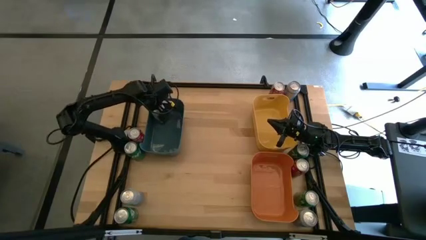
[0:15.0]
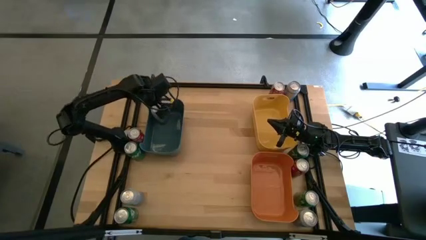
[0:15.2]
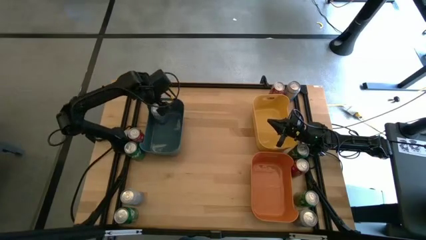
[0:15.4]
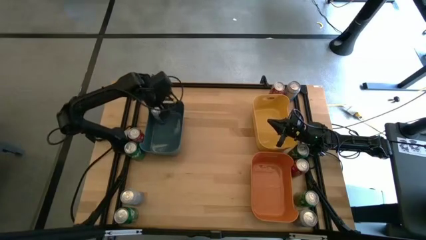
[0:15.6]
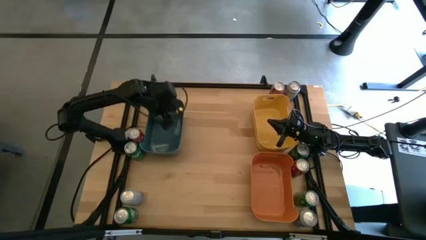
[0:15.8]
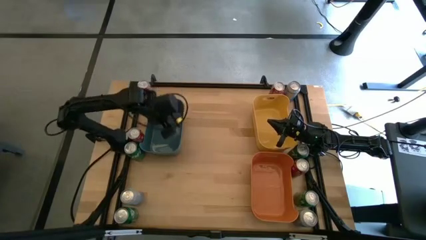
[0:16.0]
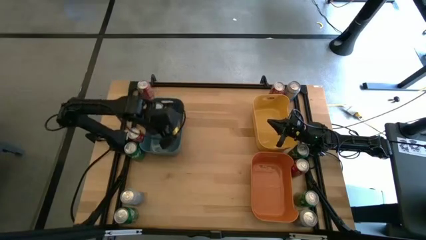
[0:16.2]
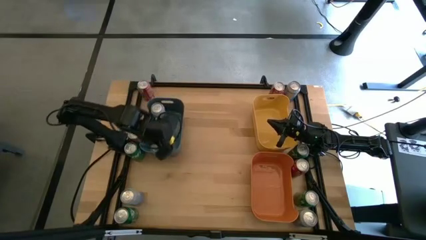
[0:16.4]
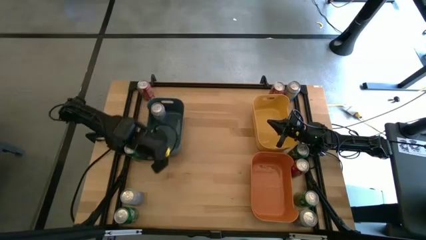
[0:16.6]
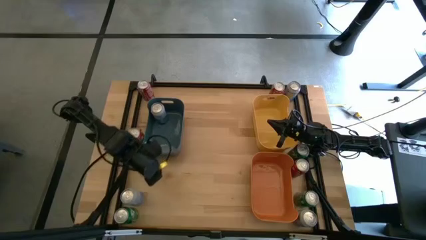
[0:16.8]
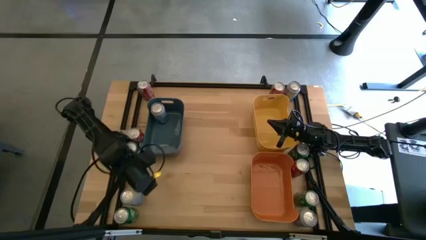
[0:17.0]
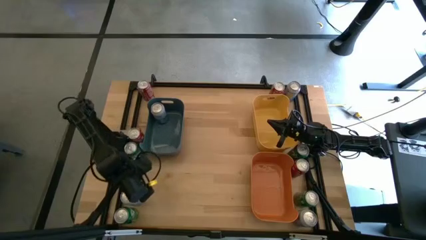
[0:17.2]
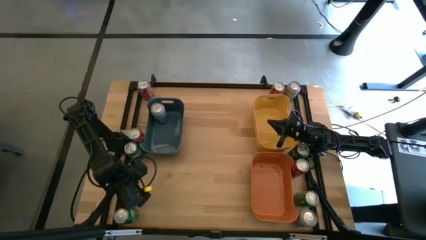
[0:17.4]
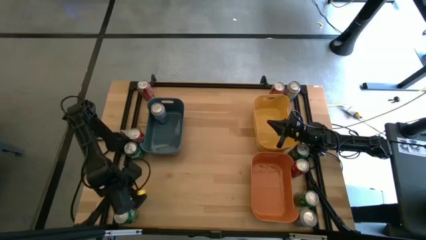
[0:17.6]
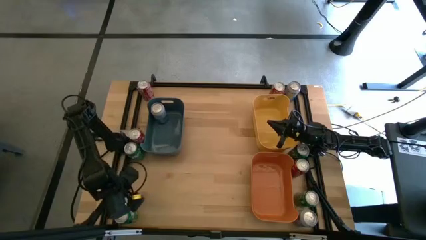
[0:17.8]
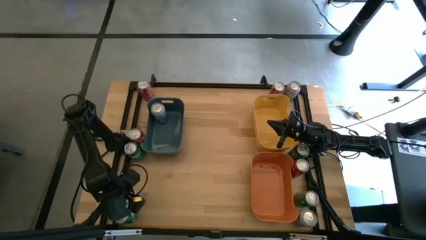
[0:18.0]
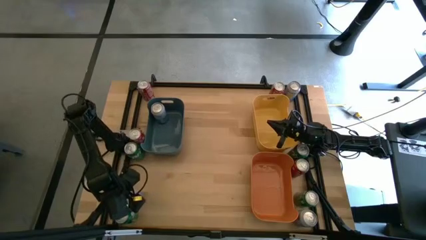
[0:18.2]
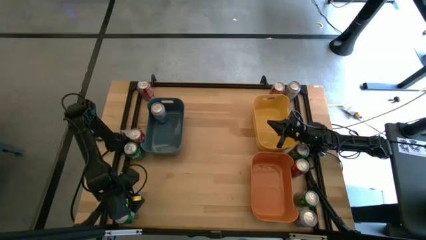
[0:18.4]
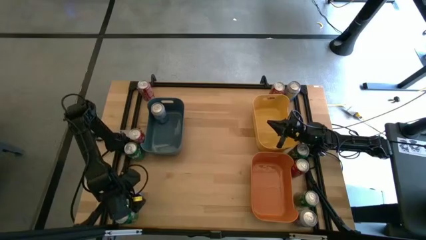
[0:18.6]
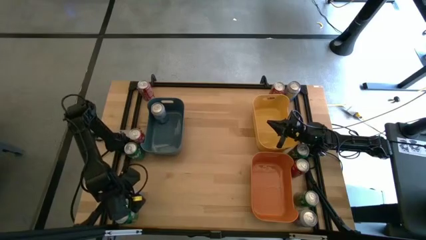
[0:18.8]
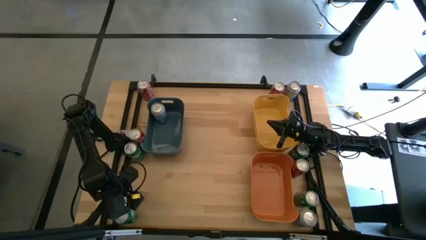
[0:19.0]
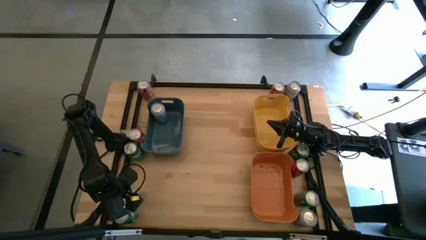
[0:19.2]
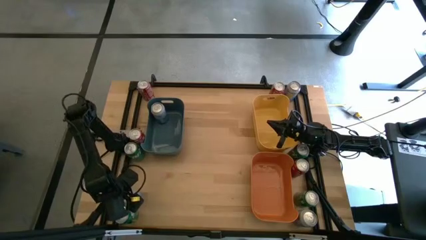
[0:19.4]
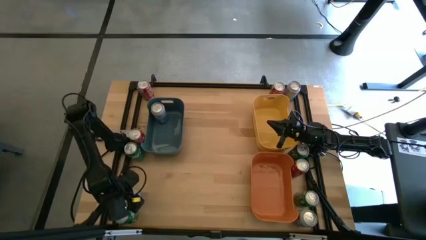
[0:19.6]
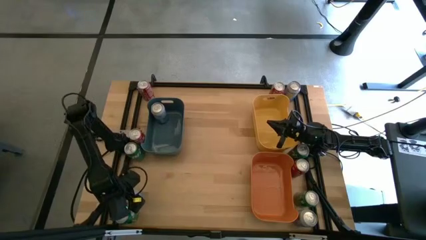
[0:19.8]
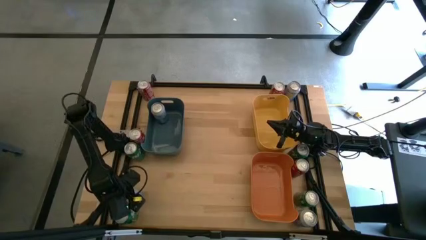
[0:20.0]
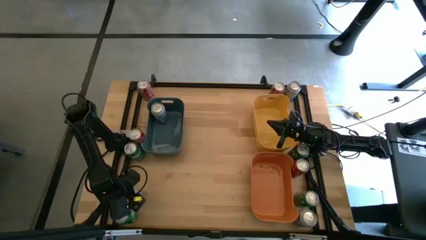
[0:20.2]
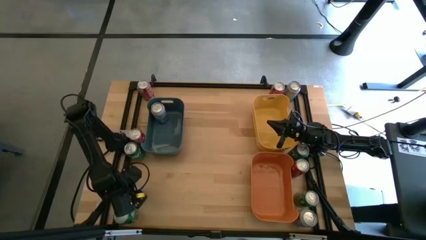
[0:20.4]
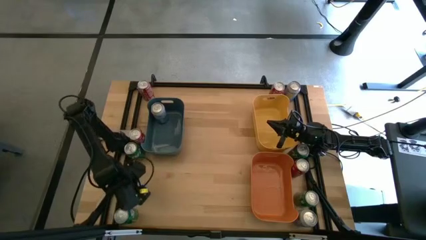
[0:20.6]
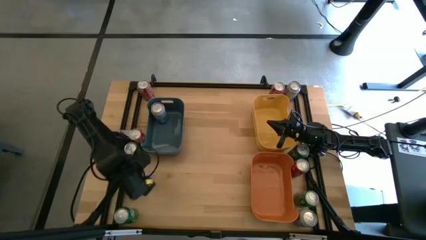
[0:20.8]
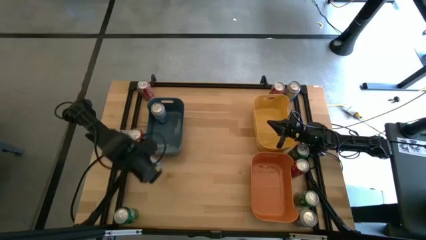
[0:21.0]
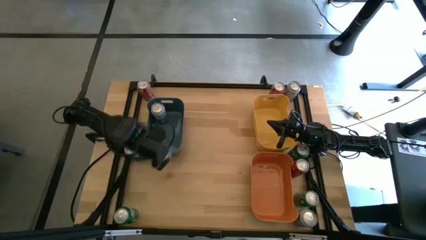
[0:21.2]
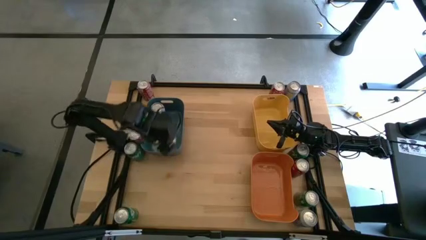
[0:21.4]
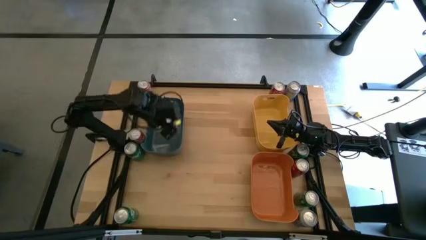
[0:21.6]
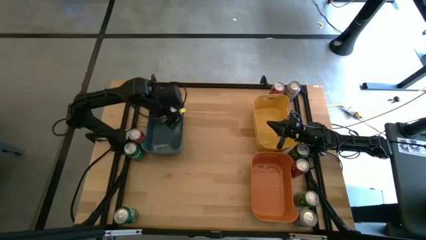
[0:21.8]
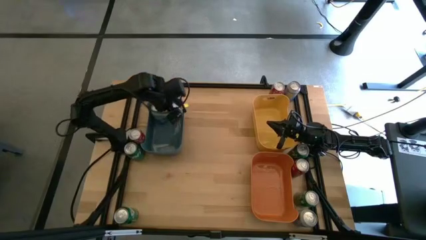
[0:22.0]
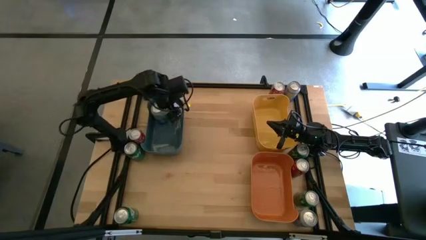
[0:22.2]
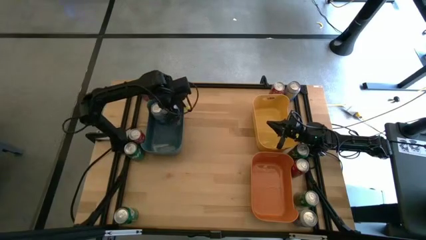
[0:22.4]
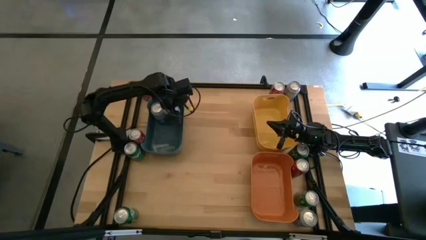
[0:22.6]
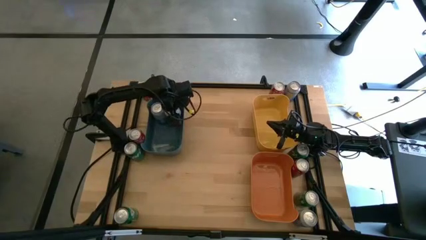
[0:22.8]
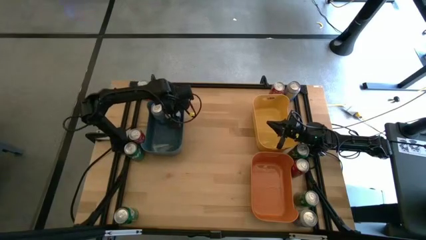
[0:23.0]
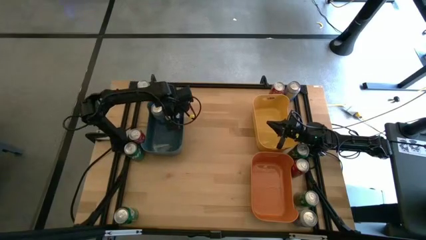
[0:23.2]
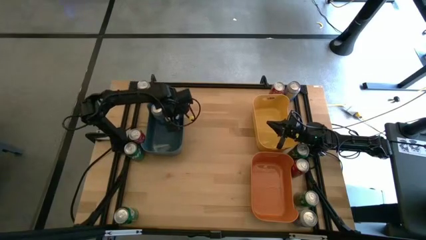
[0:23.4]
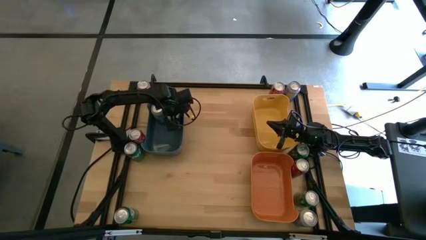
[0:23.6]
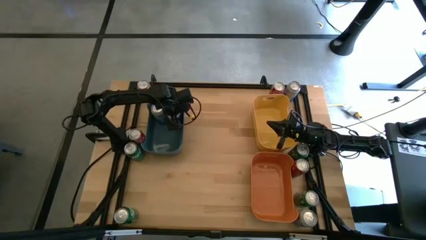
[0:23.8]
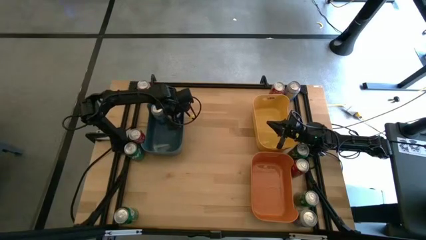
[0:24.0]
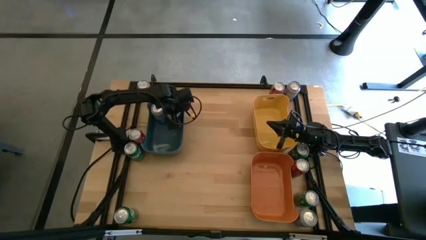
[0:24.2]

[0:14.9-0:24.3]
Task: Sort soda cans
Put the bottom left blue-white soda can into the blue bin

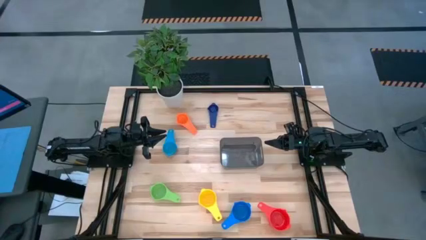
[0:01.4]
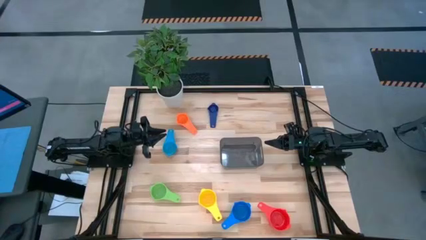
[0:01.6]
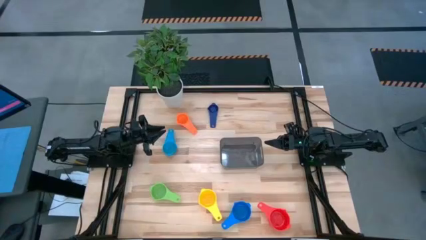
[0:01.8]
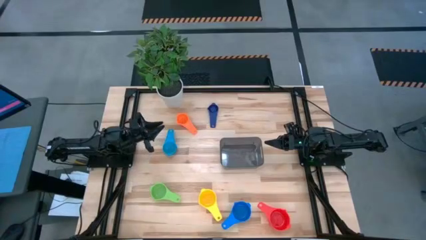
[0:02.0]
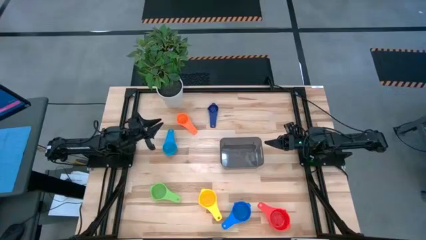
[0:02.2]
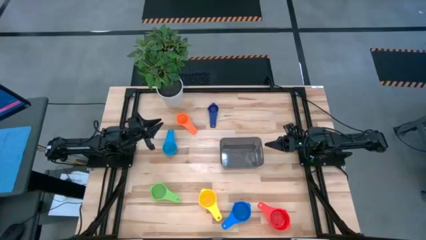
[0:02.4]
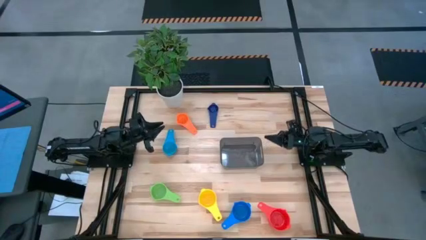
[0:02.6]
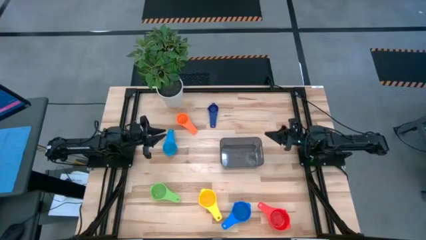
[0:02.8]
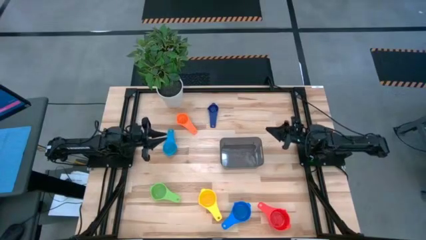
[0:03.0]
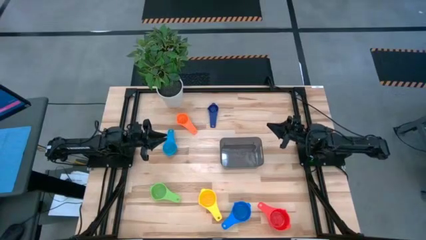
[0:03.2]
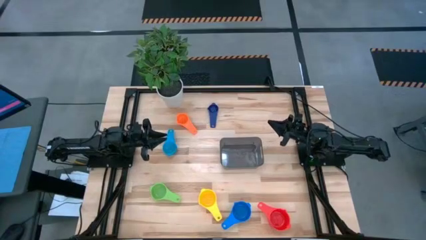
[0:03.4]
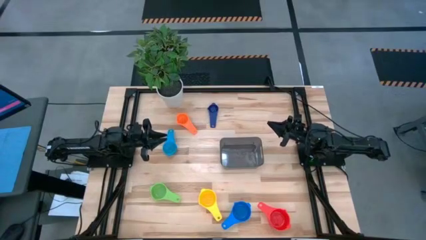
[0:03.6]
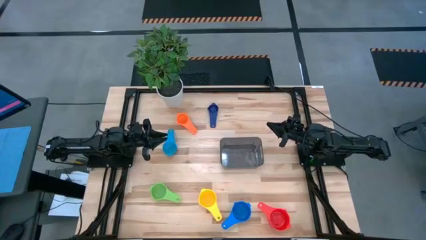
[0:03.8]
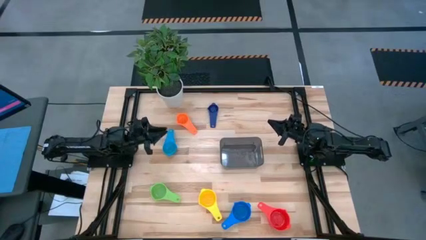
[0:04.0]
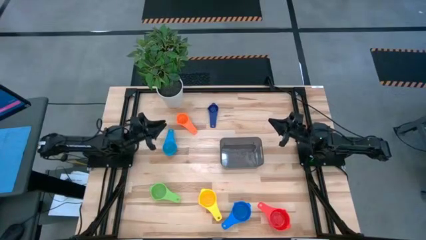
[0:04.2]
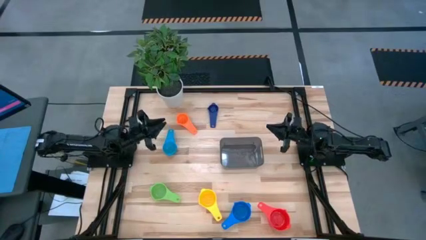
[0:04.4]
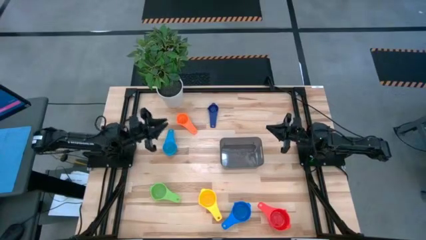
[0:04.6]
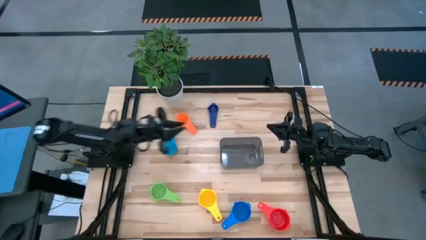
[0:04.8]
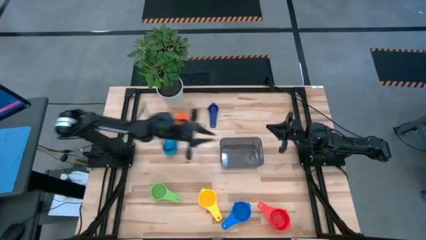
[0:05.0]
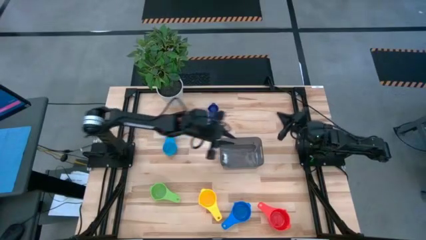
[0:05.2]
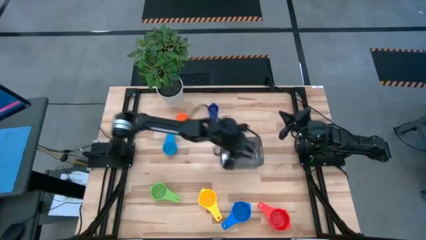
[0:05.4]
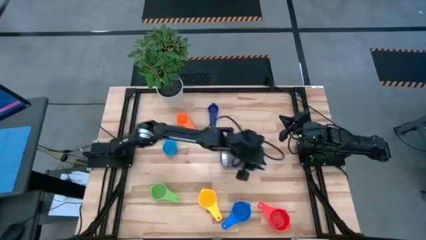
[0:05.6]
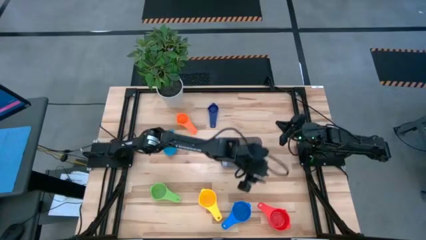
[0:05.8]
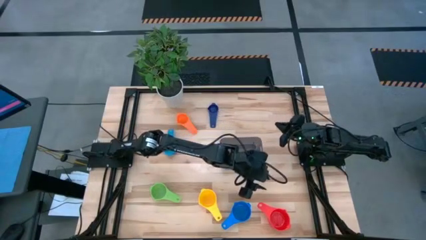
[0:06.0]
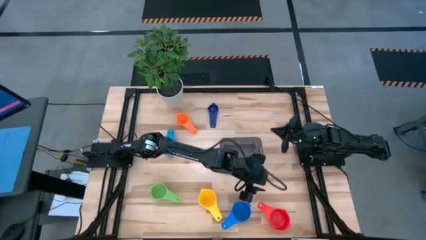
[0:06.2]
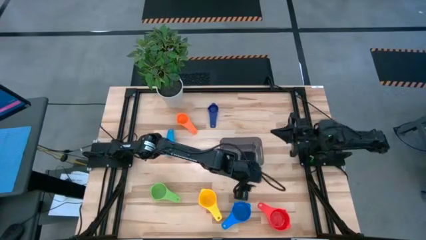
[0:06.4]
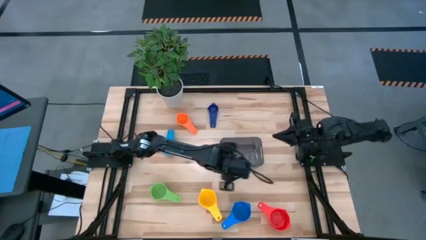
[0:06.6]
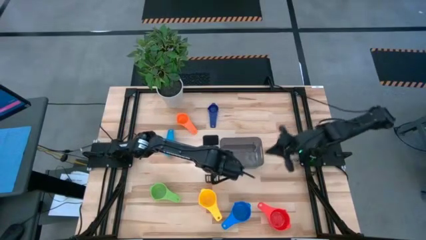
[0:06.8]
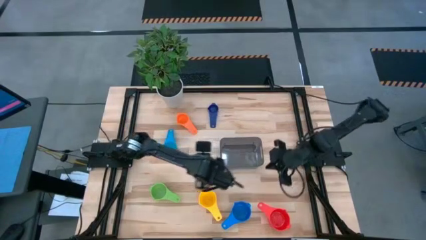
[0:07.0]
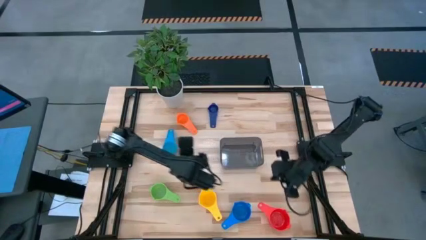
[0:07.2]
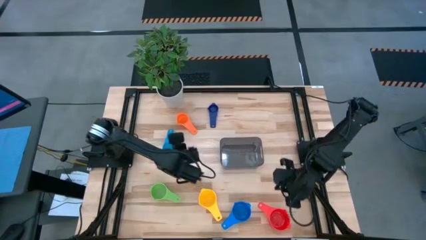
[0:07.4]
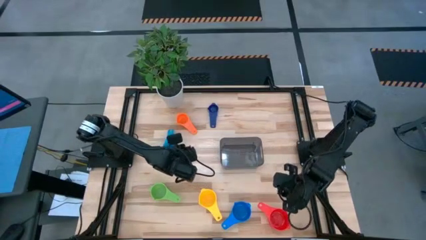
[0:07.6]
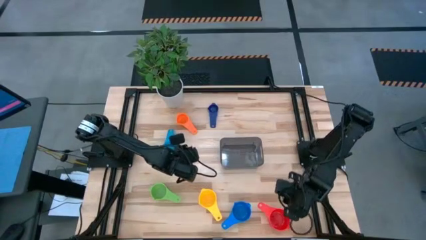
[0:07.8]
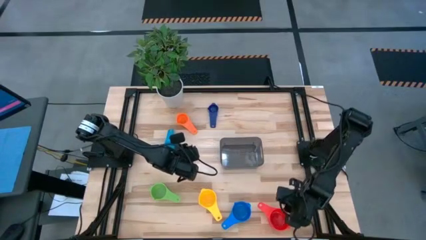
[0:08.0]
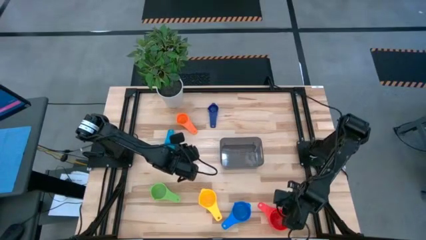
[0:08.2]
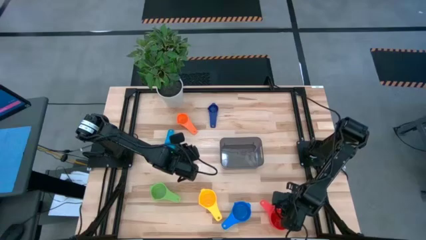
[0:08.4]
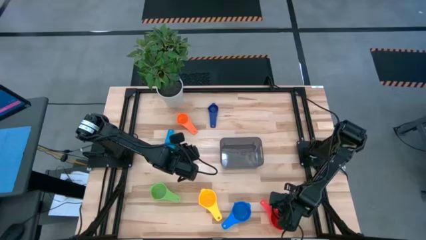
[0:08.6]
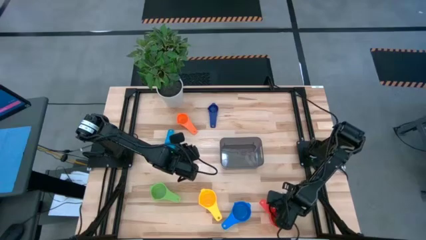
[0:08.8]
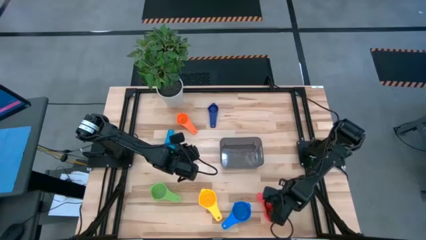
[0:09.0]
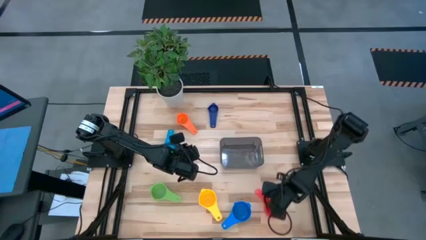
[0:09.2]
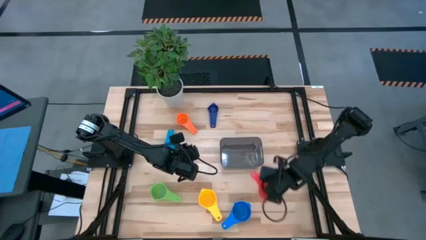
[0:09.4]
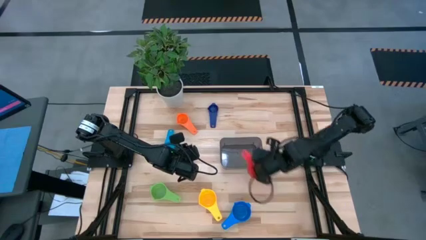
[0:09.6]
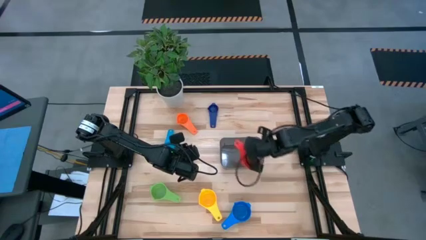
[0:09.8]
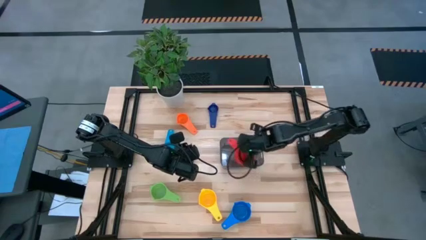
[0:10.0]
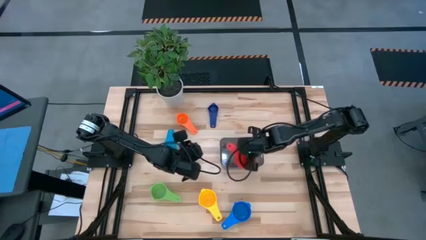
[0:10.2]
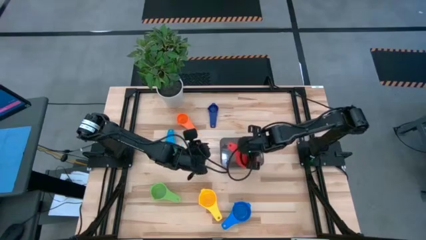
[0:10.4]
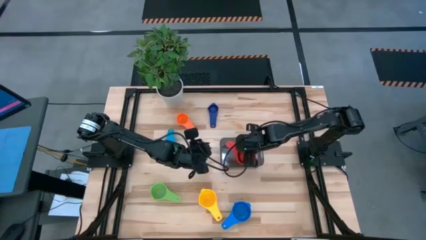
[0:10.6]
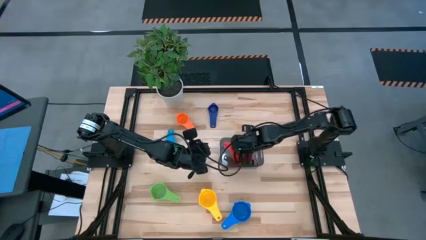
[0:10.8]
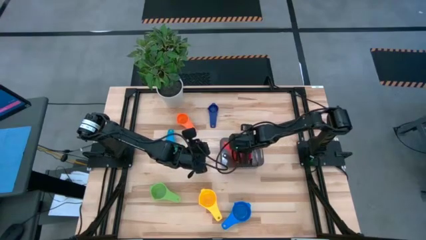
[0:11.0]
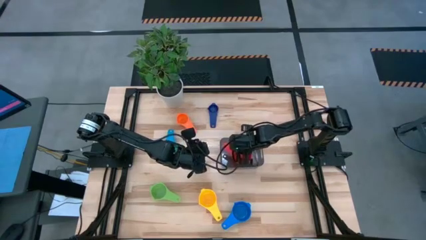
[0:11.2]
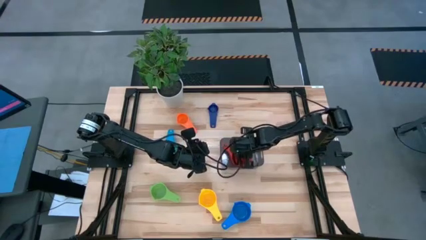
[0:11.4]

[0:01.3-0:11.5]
Task: Nest measuring cups in basket
Put the red measuring cup into the black bin
